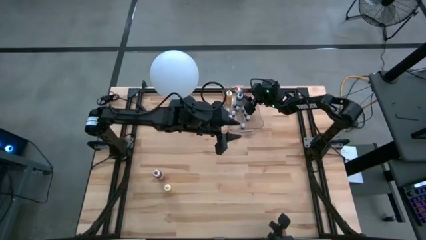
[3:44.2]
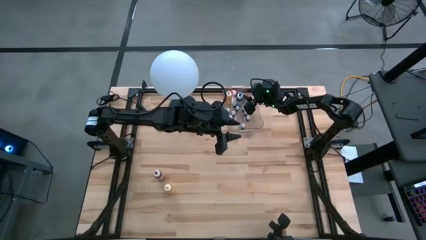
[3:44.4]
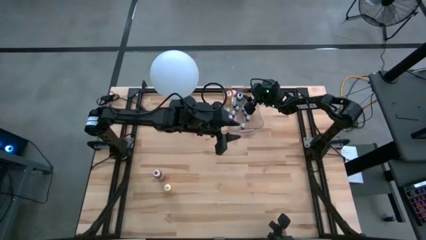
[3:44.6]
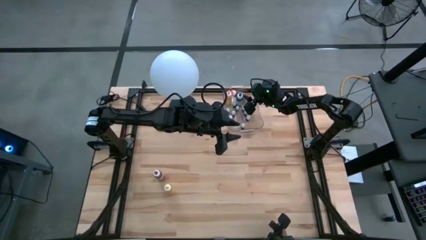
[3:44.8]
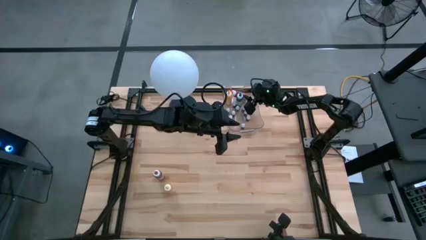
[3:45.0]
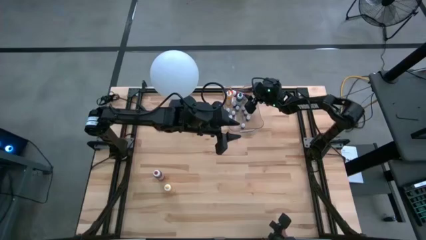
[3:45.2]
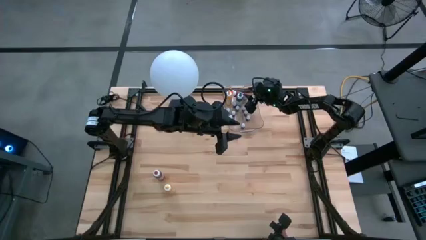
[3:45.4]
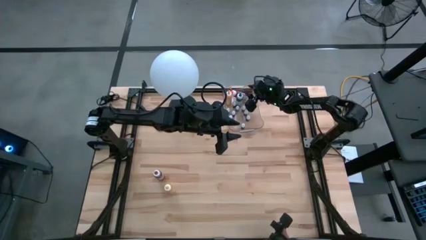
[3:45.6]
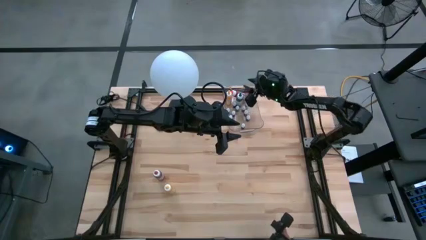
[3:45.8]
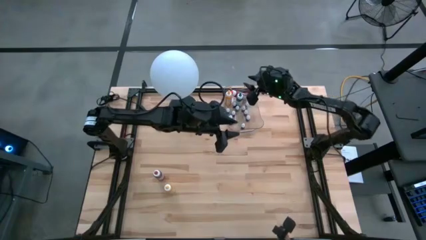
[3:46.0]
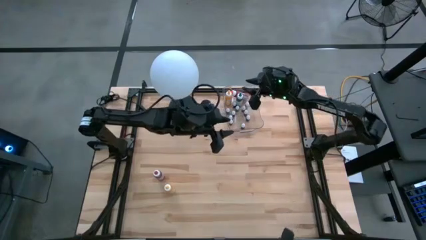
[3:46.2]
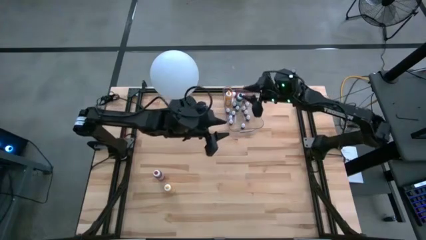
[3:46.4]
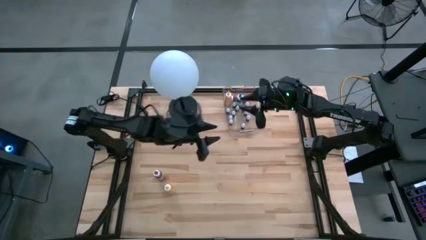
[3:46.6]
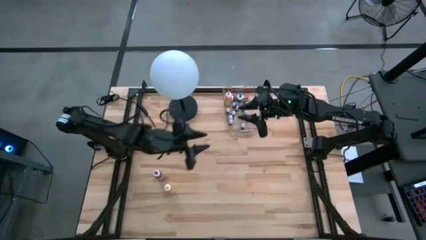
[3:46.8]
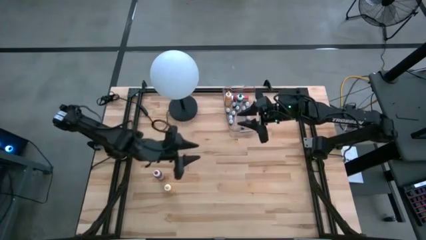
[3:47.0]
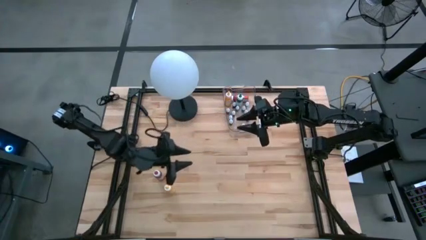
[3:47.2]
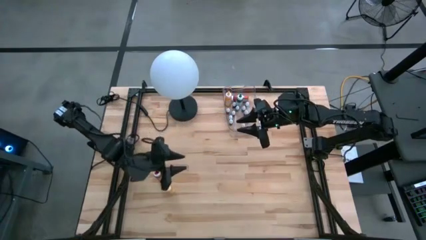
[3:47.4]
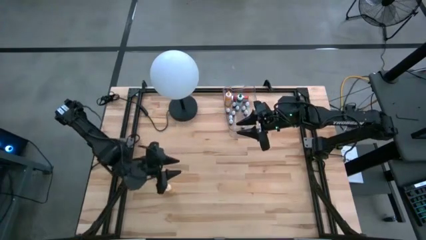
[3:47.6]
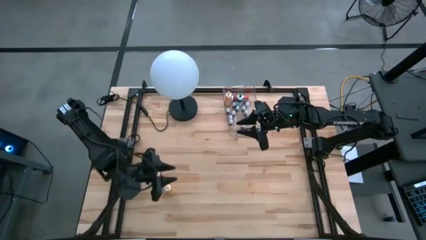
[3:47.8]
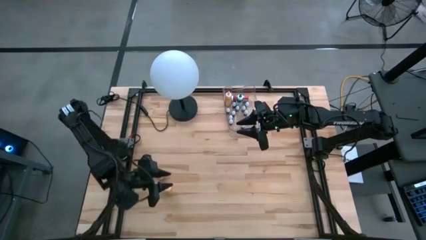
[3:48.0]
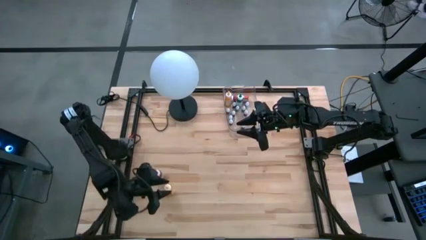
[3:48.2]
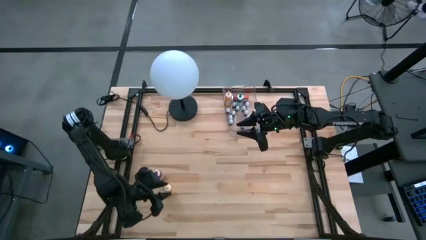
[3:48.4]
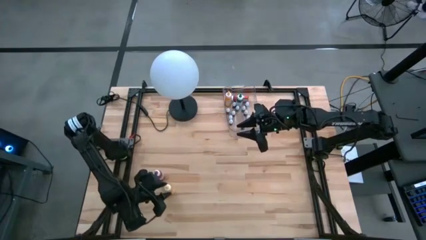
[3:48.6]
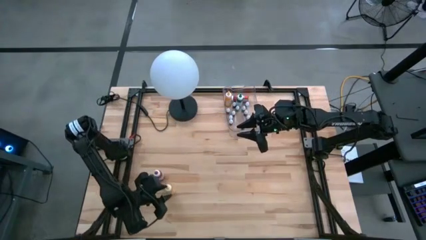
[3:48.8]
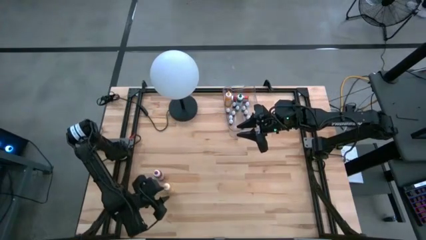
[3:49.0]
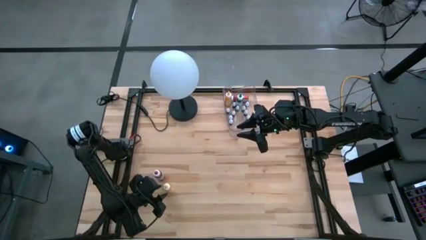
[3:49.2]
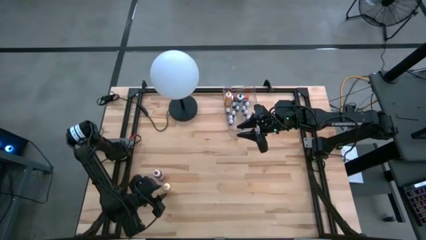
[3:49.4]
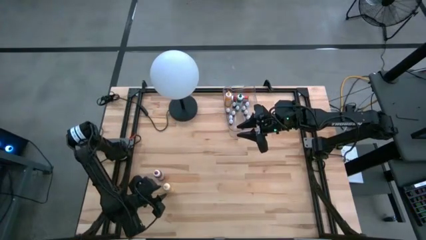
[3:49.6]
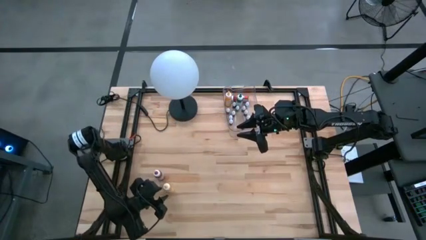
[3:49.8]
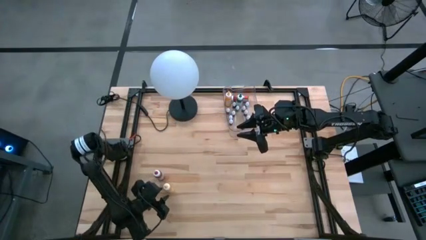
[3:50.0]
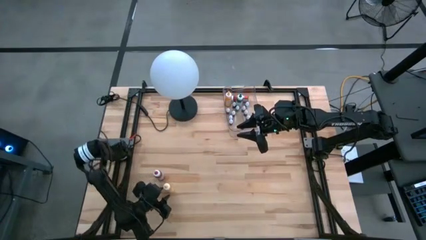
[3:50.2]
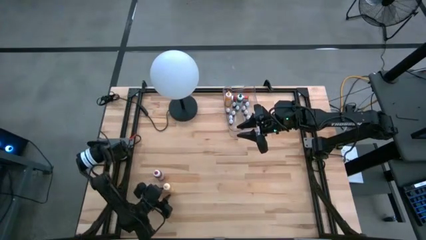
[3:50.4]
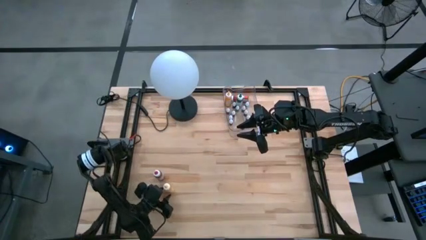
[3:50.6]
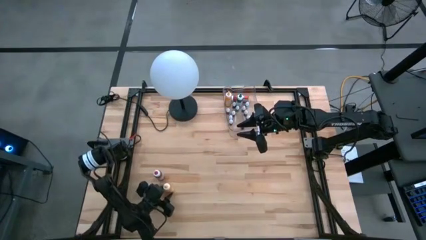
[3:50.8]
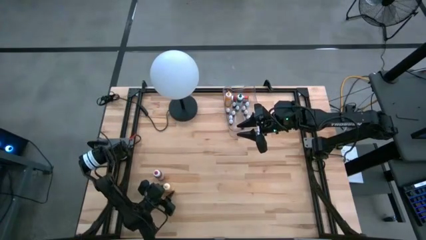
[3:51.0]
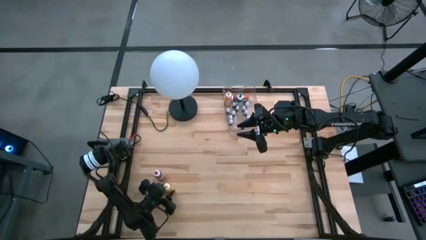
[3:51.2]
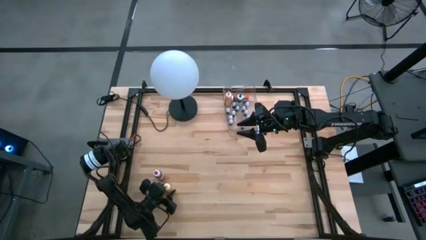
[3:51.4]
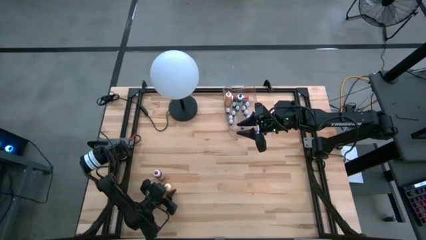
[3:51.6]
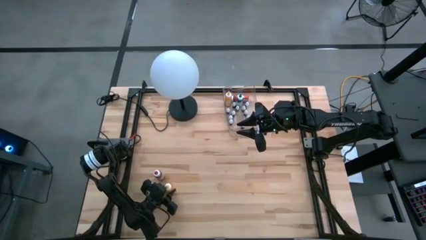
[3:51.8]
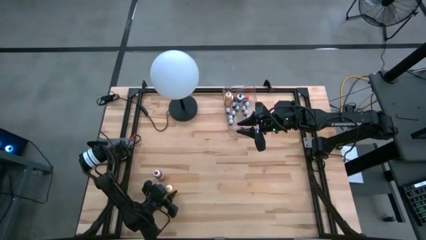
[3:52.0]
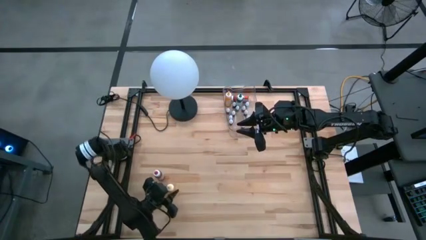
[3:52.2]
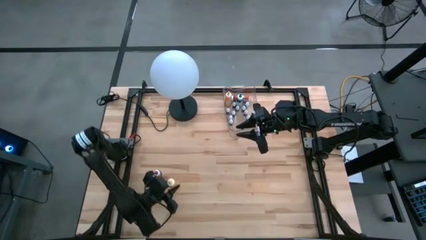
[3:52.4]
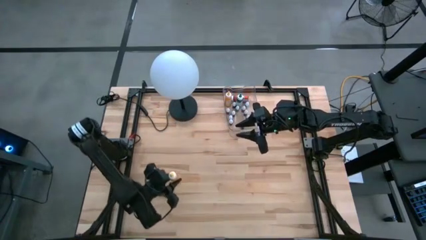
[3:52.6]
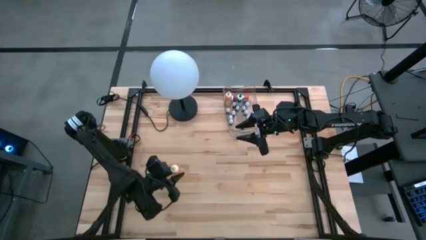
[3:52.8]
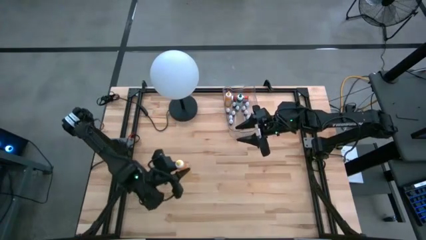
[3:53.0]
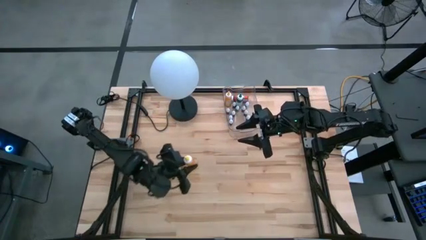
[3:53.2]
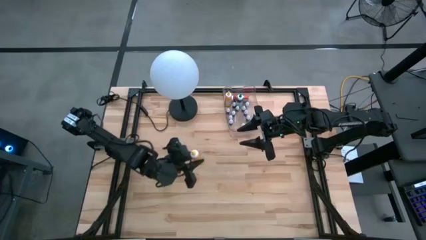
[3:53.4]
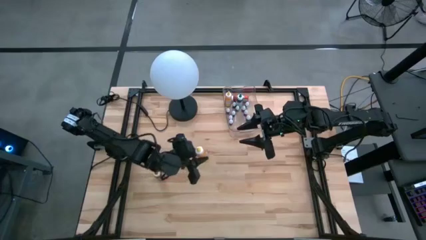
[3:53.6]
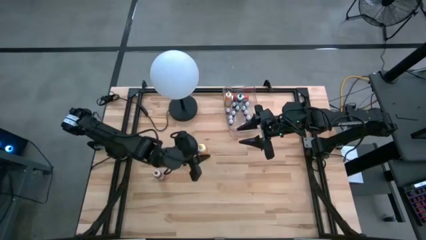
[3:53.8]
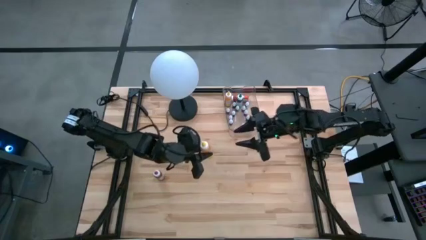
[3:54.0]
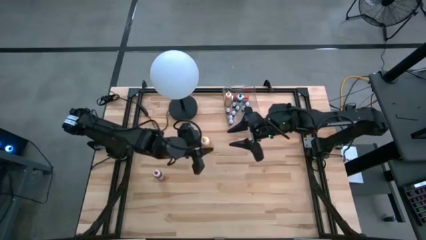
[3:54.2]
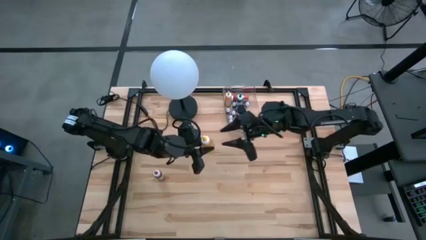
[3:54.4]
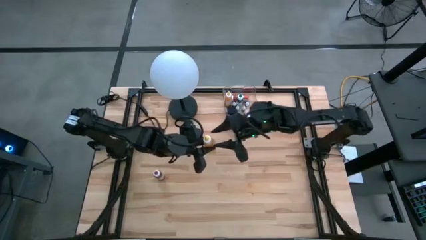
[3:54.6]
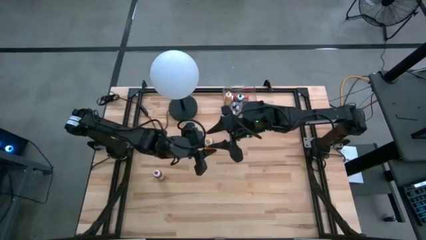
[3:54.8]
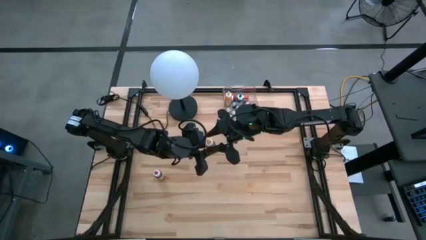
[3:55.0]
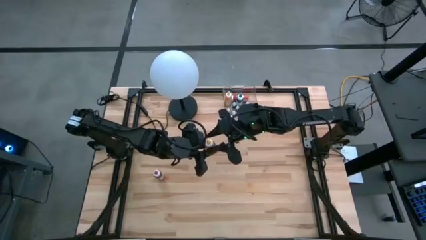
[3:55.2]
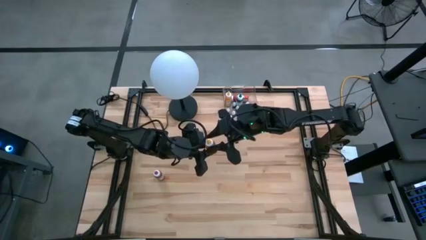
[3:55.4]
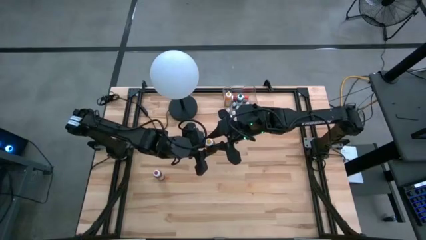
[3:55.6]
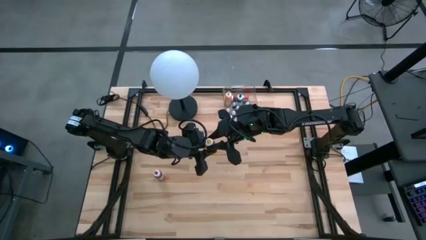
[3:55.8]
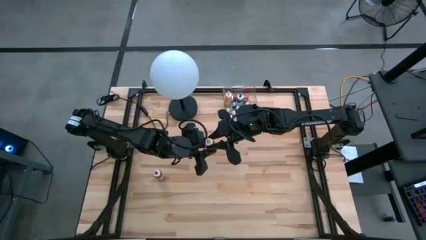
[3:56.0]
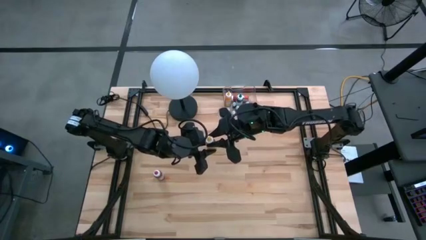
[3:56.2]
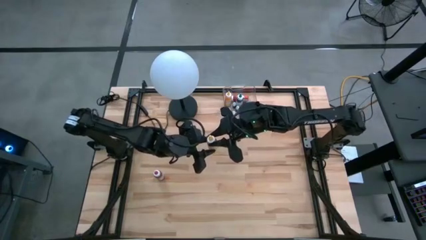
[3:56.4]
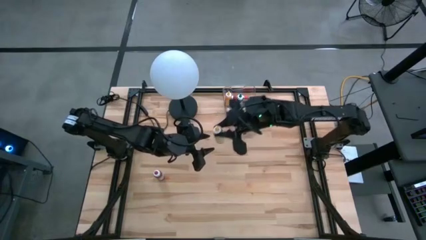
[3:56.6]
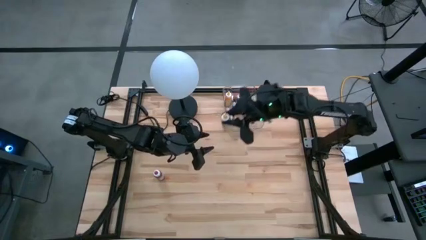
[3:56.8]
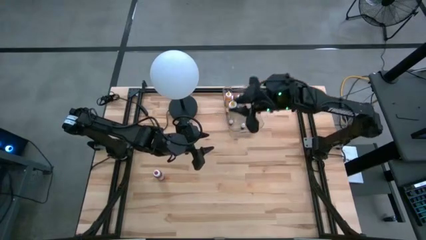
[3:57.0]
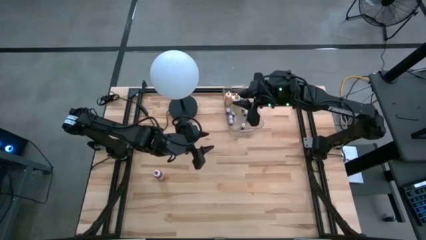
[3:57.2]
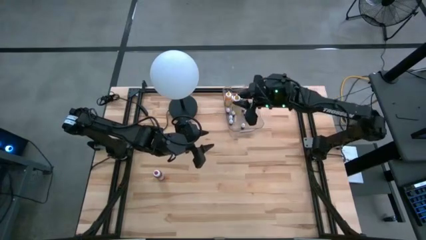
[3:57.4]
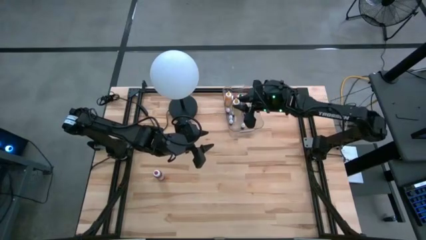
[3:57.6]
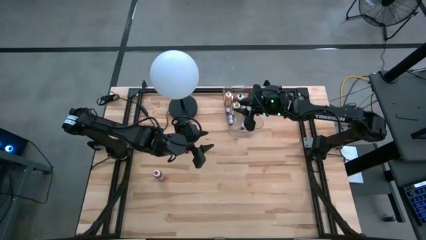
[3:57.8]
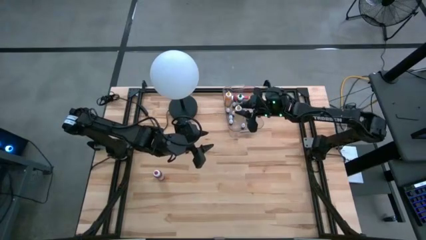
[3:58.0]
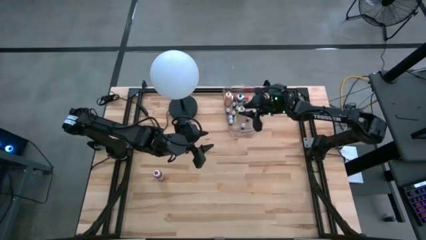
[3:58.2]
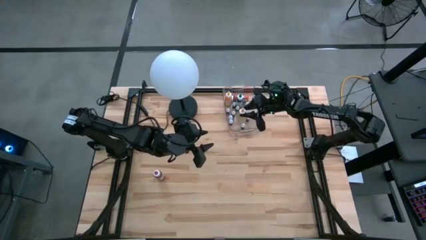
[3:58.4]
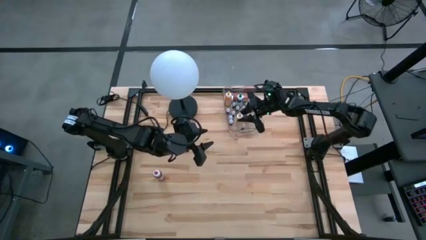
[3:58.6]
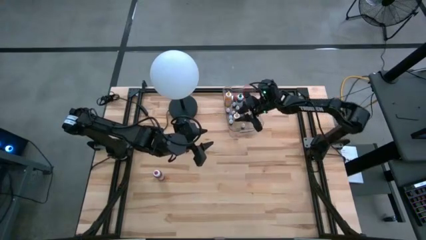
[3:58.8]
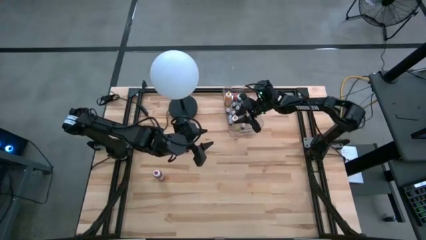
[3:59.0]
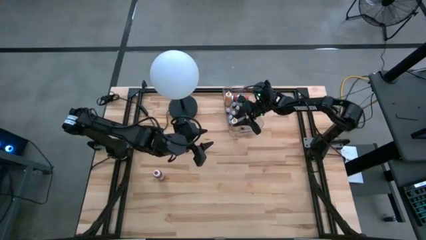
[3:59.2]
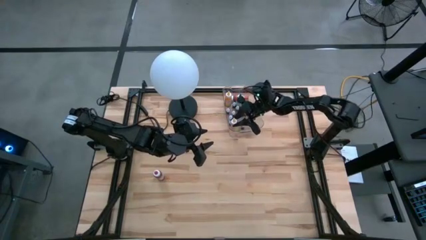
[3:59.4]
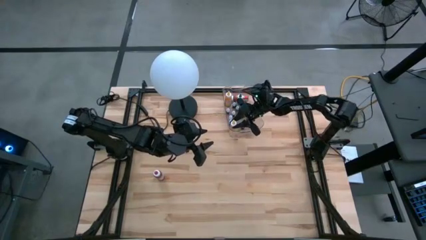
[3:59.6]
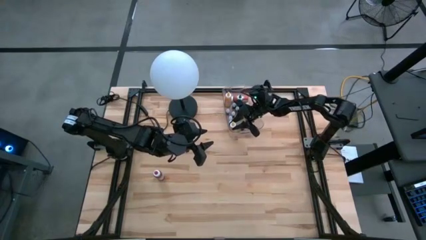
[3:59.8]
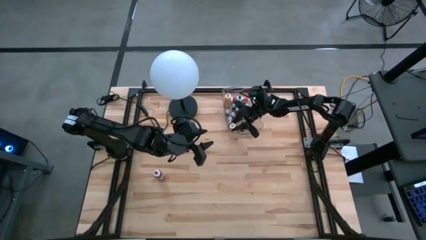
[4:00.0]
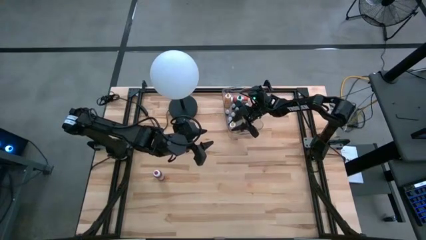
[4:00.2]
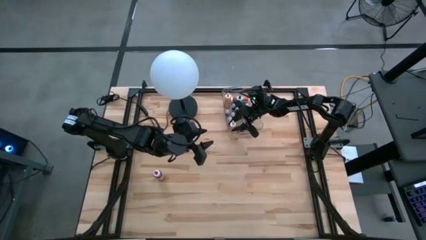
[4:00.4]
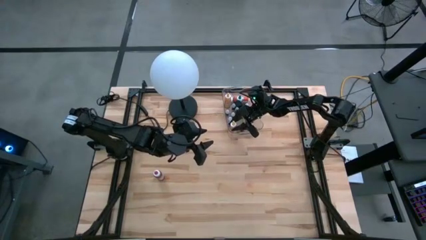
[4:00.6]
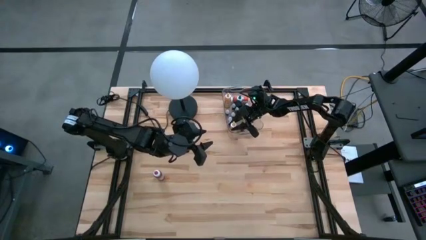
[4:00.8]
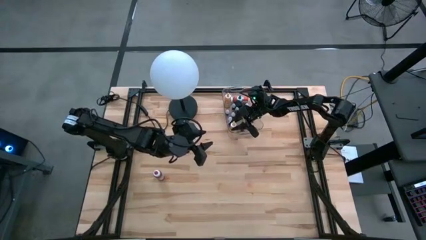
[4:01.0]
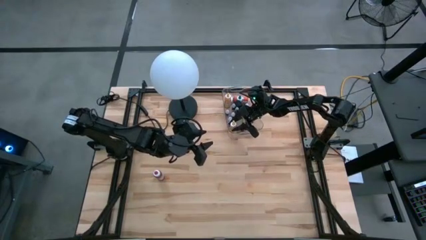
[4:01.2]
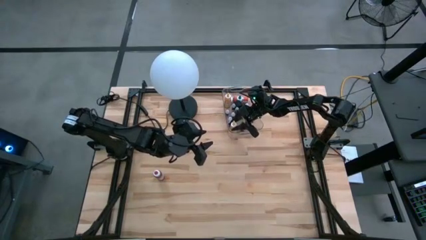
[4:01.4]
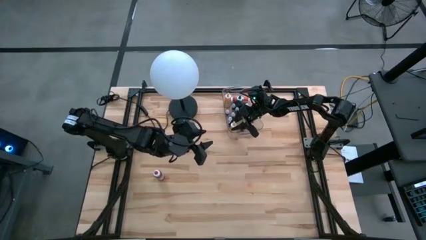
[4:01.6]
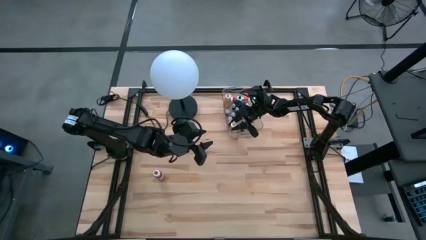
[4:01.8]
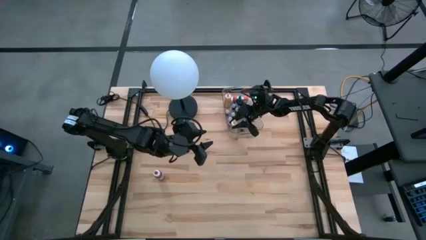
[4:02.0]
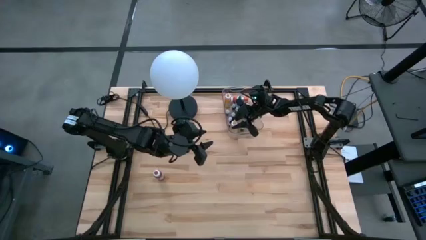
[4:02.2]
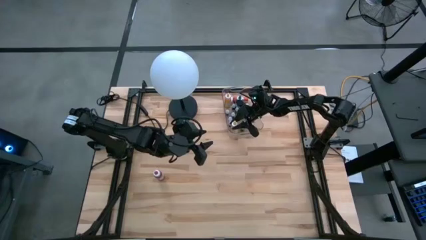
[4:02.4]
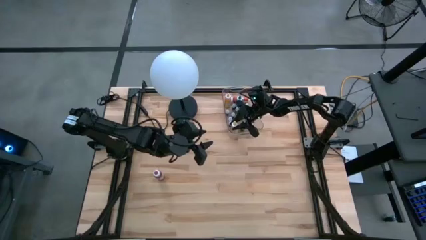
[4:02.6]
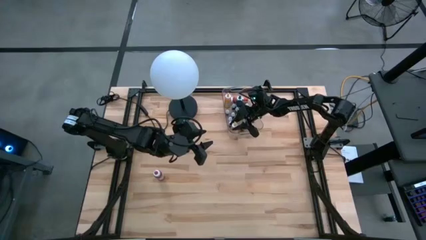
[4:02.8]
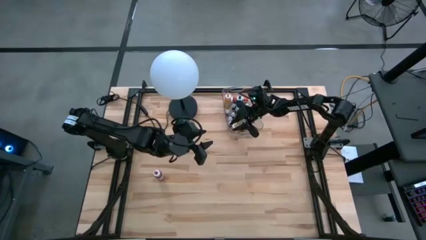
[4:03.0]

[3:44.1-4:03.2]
Task: Pick & Place food coloring
Put the large yellow food coloring bottle into the transparent bin
